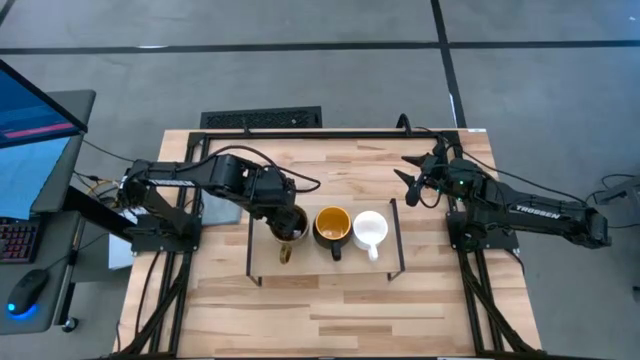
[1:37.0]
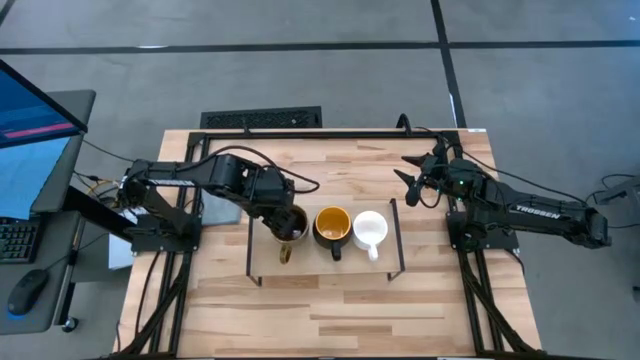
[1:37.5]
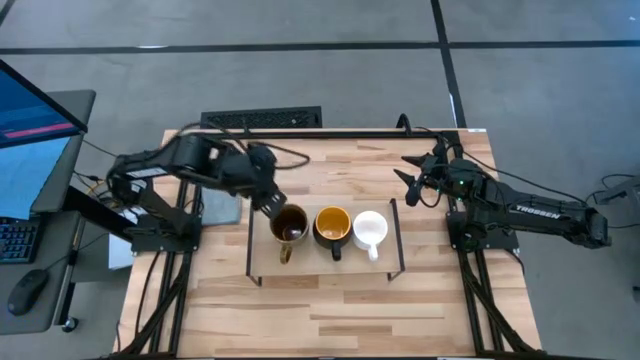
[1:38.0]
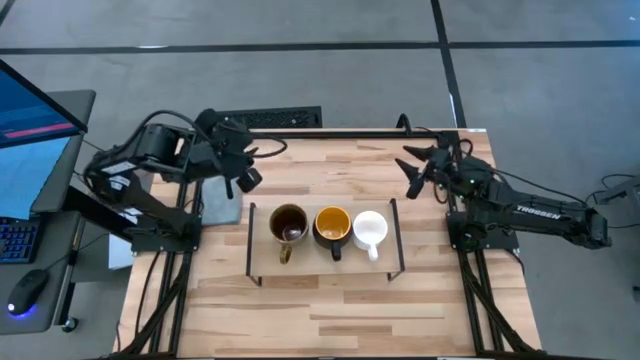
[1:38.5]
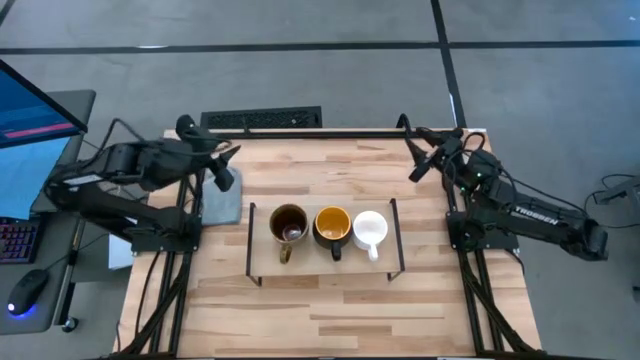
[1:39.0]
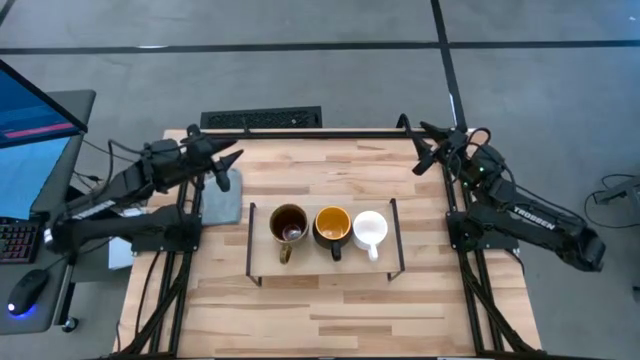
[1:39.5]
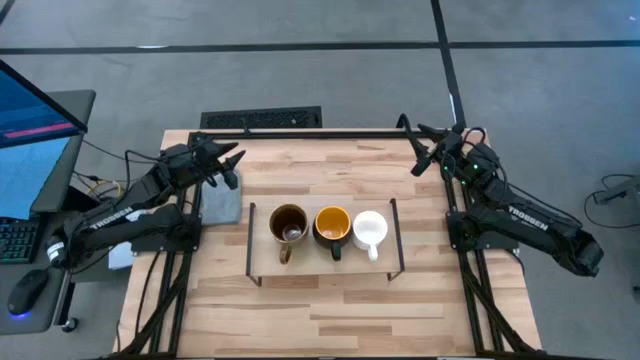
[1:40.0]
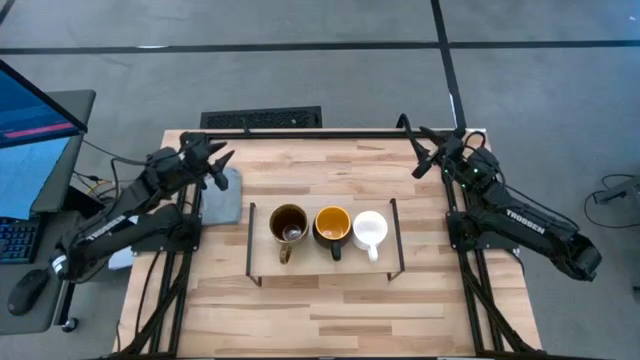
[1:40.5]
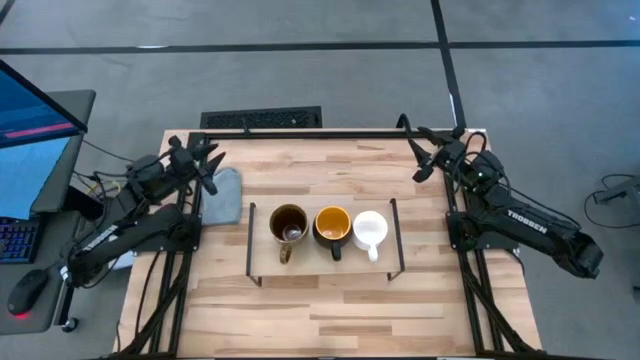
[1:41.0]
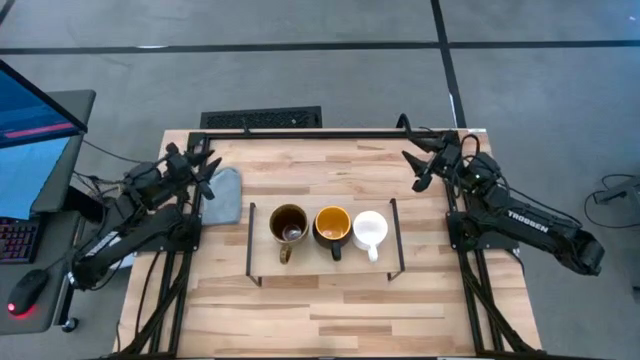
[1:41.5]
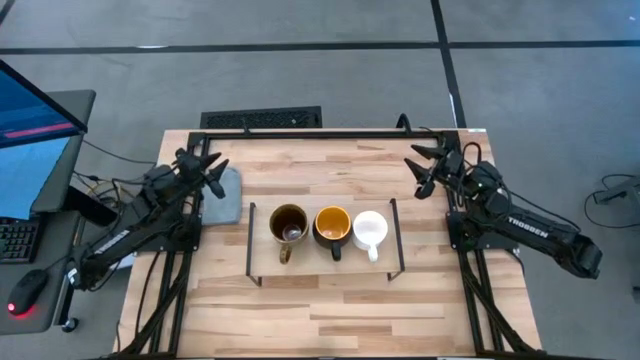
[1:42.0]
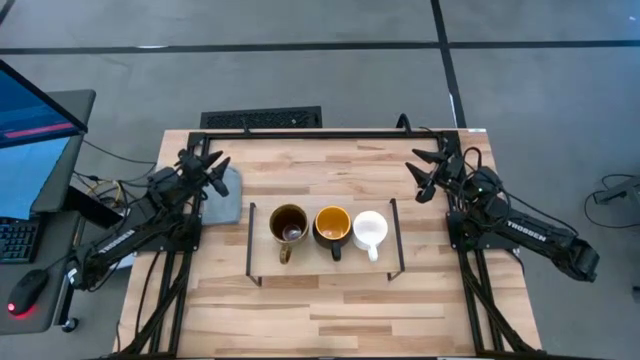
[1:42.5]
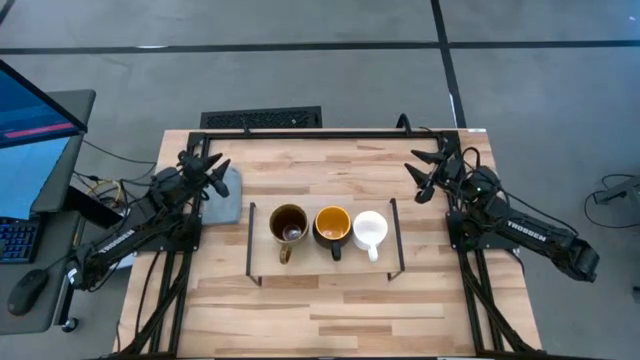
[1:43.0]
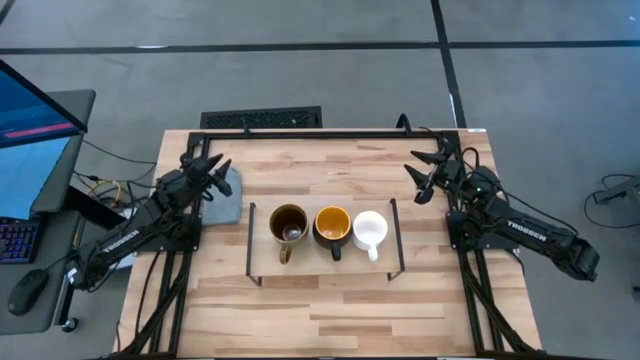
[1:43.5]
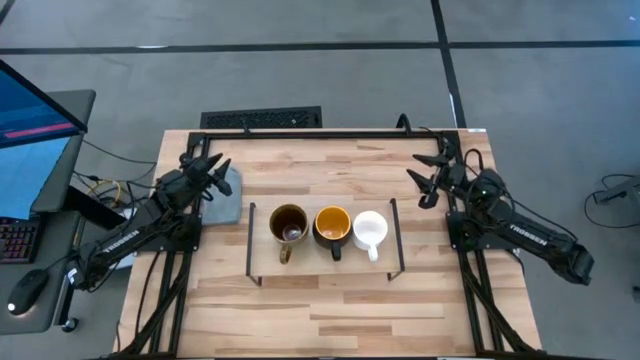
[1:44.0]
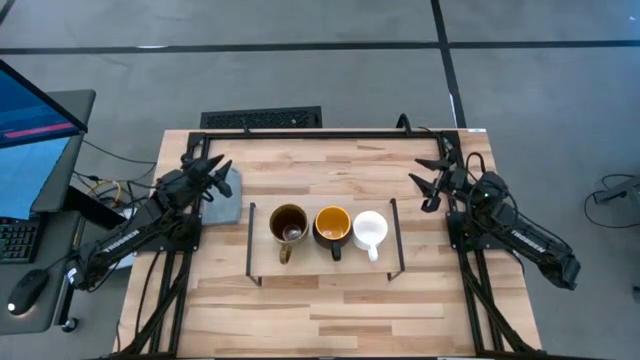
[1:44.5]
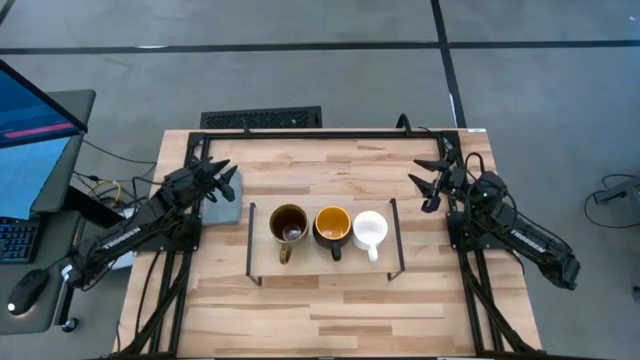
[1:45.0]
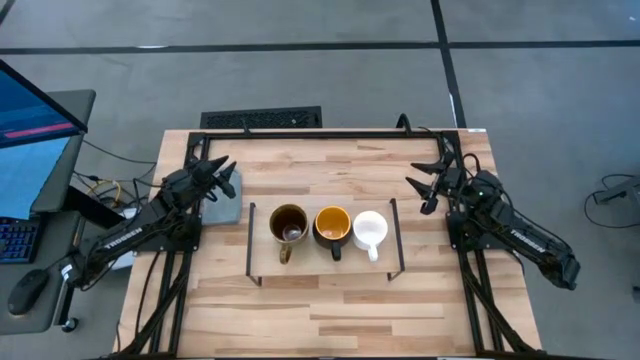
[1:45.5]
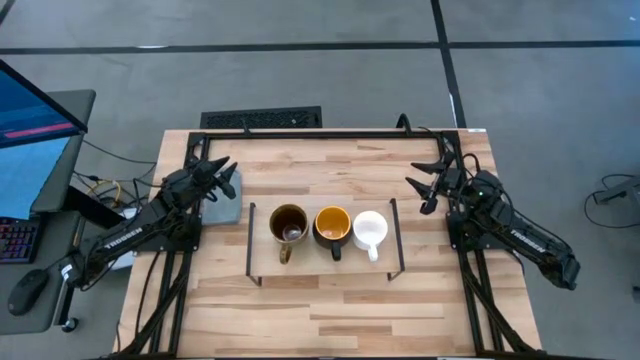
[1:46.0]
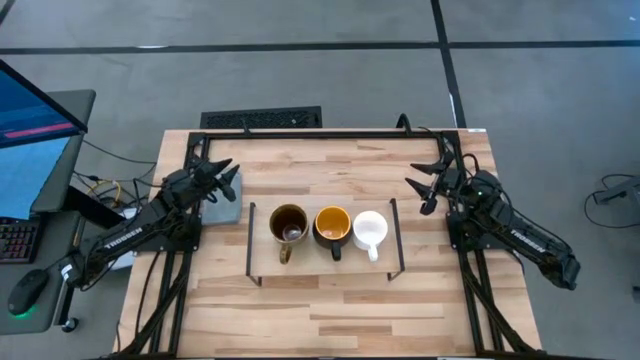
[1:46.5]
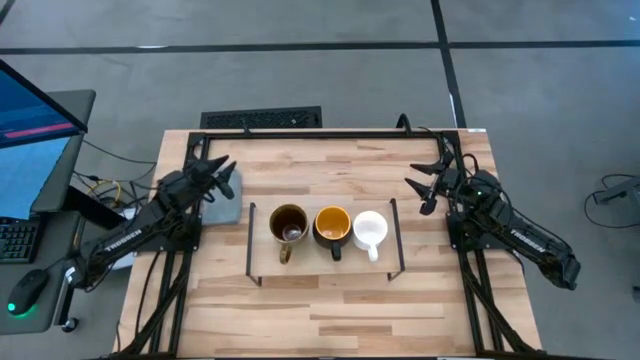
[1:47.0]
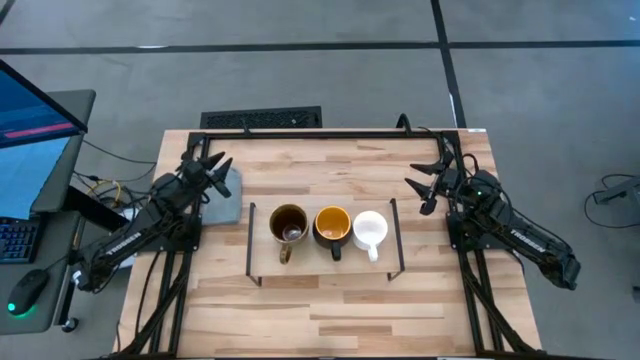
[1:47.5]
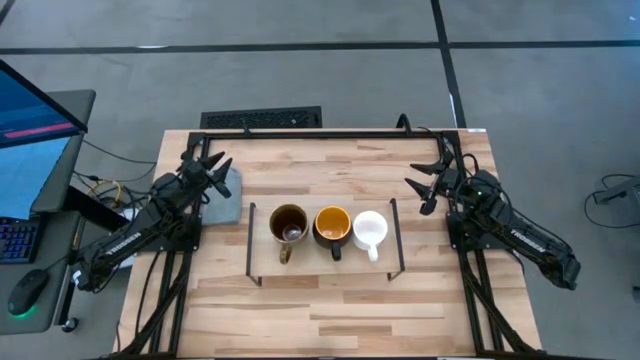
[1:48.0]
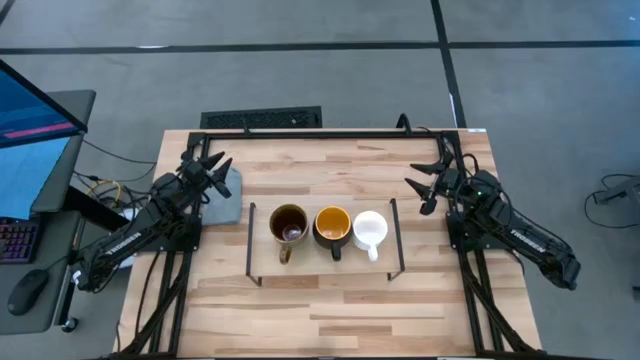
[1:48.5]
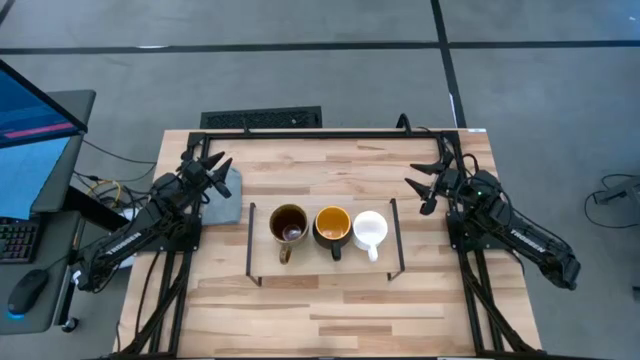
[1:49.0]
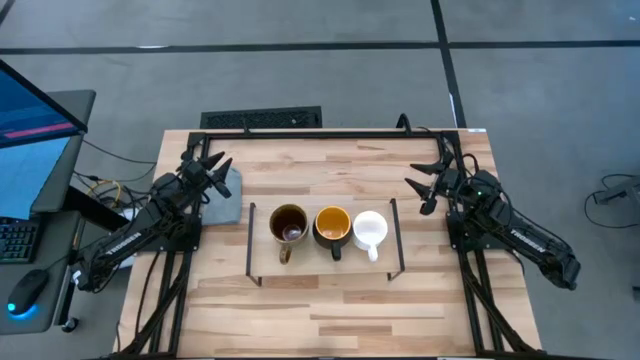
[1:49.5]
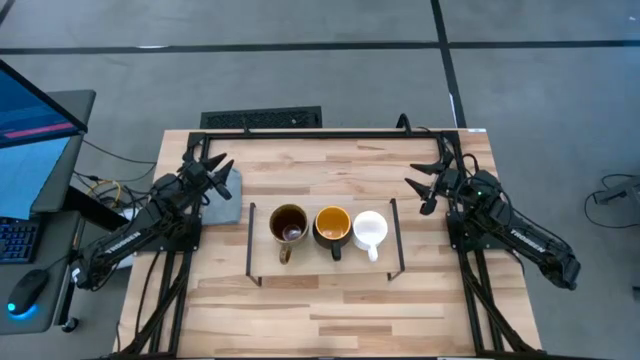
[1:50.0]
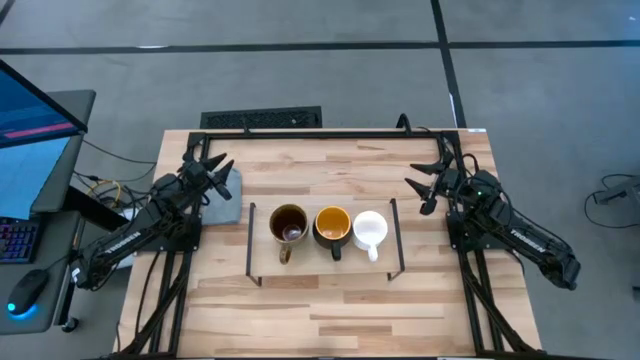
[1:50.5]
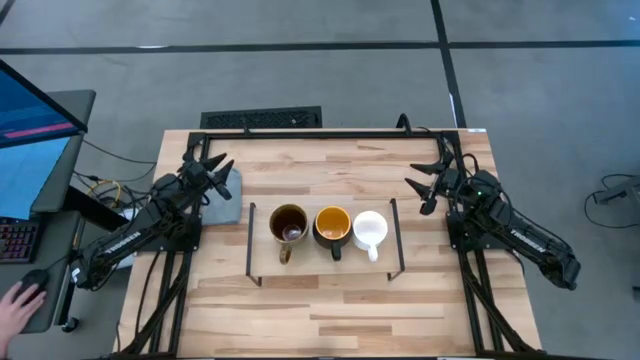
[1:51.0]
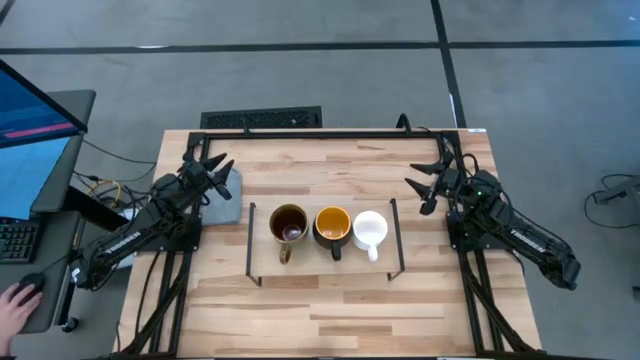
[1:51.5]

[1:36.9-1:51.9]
Task: Stack small to large cups/mugs on shelf
Return To Home Position
